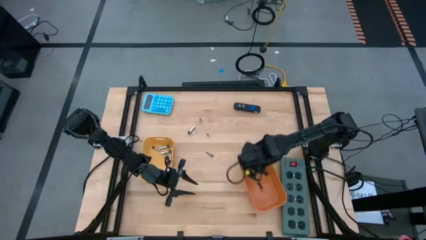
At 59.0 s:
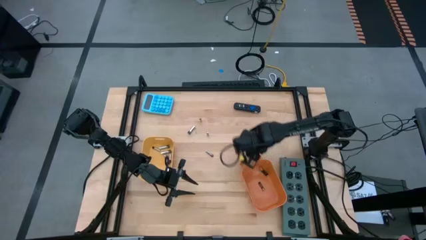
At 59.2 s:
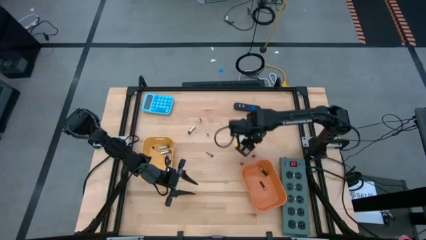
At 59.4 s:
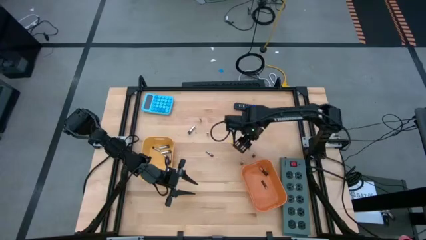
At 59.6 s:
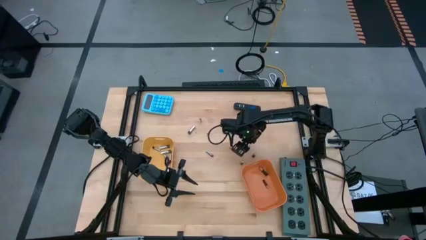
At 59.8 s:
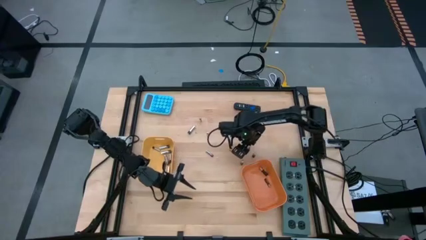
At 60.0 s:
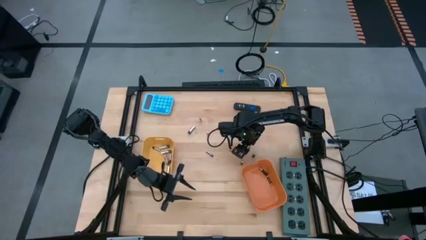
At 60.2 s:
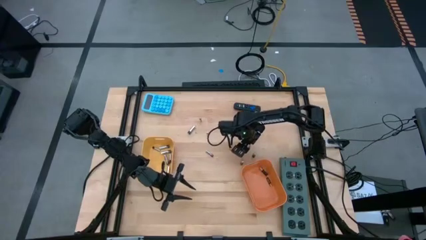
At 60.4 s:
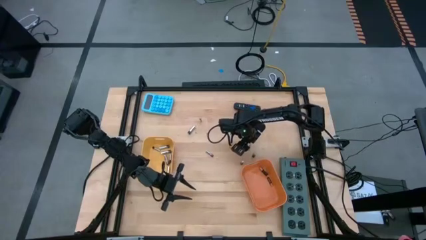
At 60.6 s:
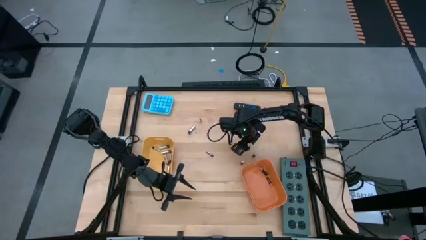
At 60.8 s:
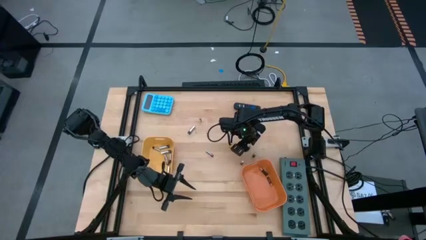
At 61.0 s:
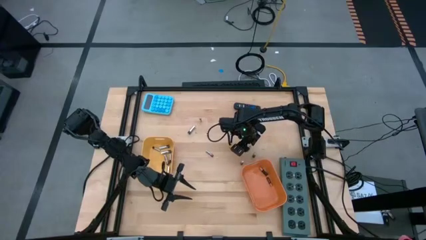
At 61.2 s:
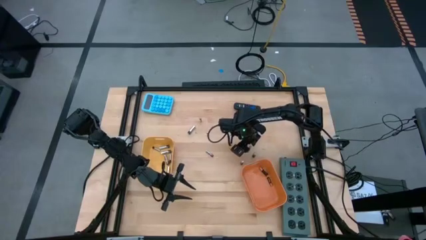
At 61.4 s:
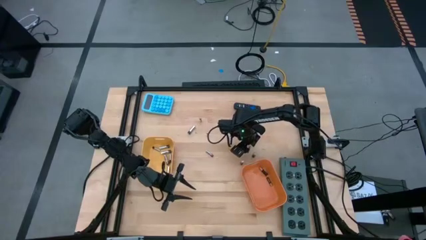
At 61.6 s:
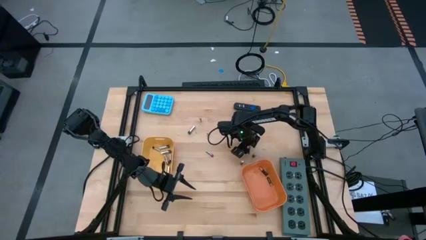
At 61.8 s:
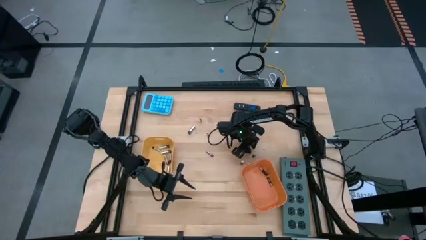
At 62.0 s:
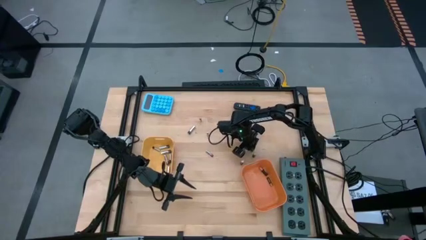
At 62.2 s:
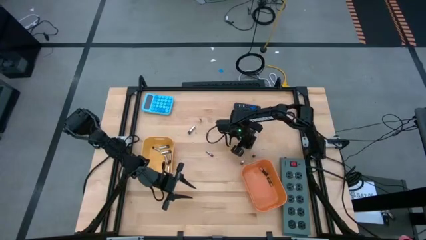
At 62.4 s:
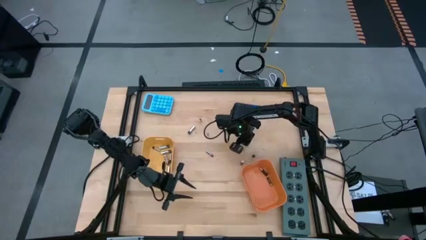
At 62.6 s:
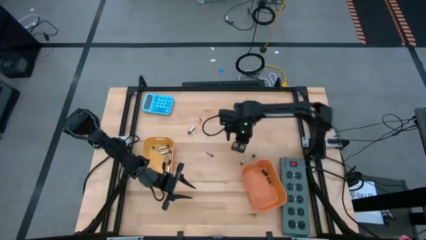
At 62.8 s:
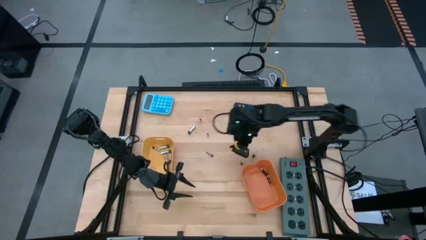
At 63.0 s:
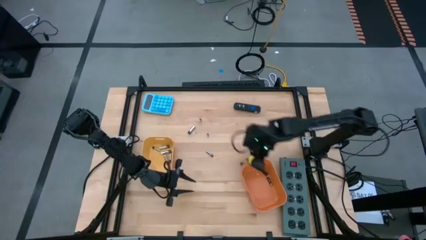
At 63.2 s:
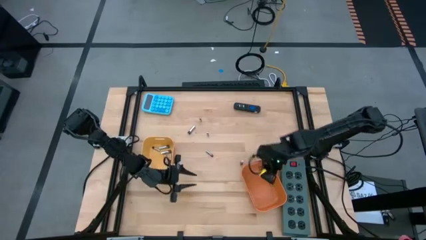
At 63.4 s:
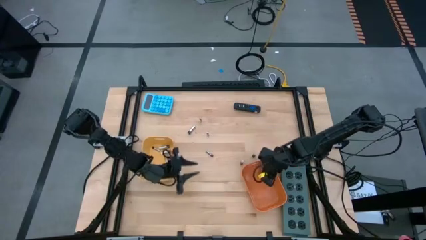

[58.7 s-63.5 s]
Task: Sort batteries
Put the black battery into the orange bin

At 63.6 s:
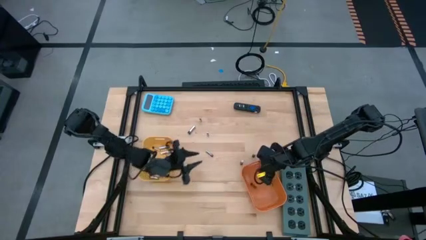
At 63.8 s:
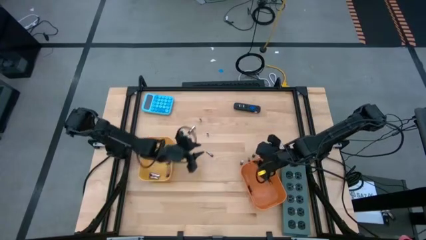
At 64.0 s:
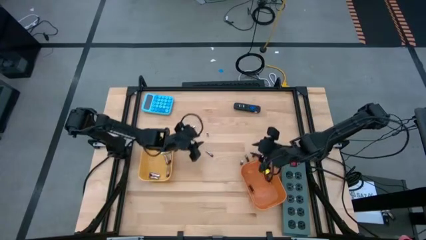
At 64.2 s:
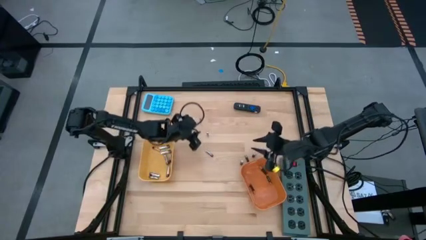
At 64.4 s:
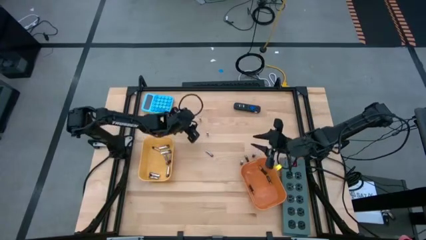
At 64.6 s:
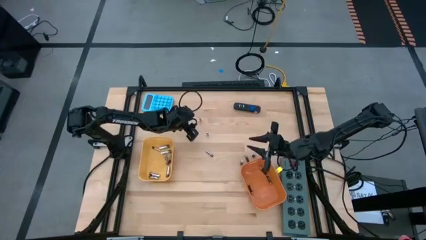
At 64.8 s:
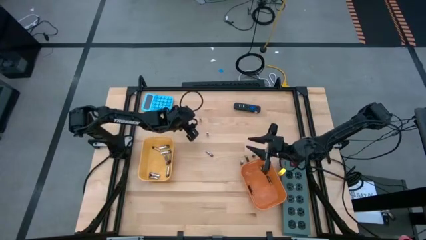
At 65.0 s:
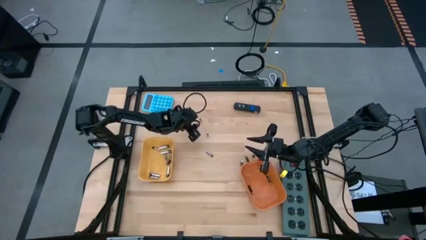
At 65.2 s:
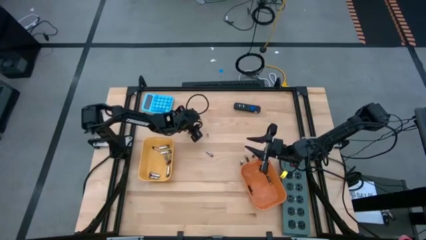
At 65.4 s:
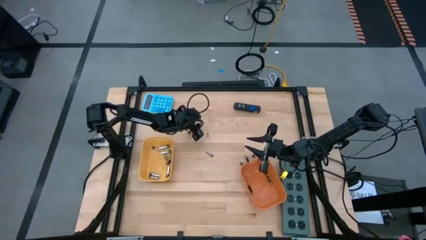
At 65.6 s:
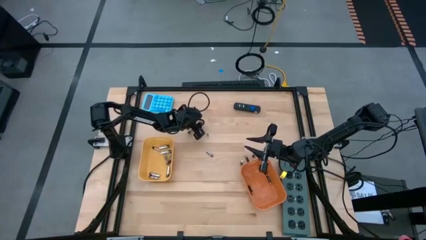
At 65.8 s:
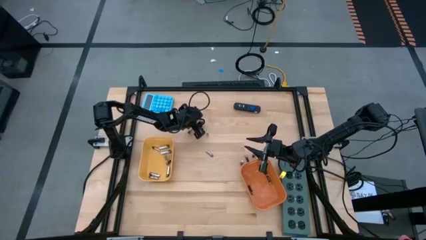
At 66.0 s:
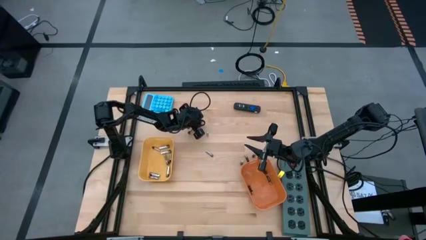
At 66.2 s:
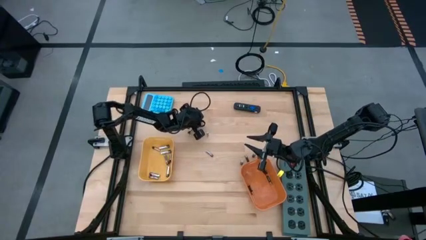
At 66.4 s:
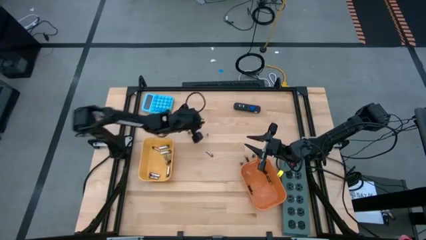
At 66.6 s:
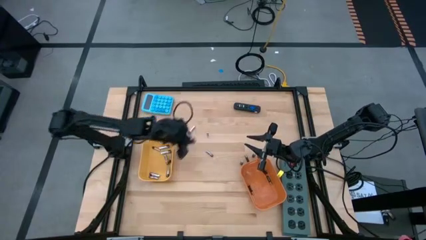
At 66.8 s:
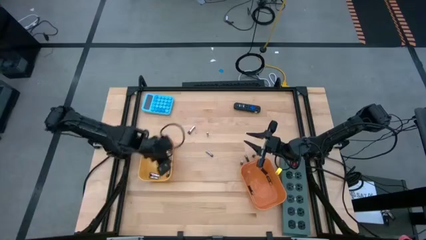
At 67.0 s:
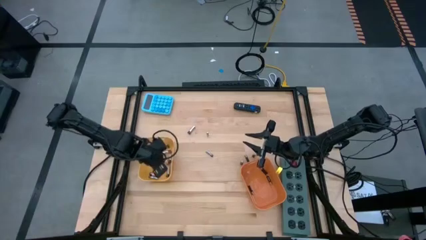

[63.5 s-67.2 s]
Put the silver battery into the yellow bin

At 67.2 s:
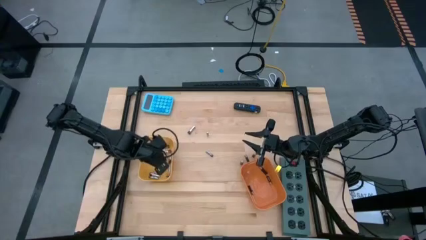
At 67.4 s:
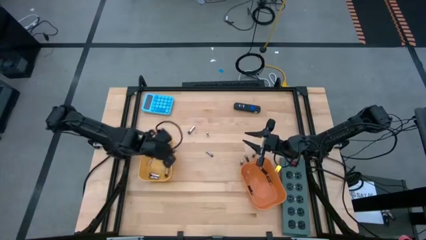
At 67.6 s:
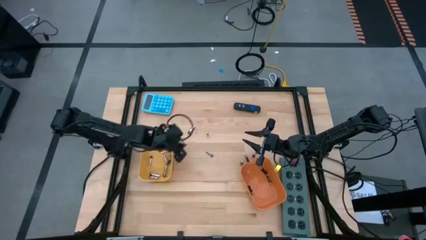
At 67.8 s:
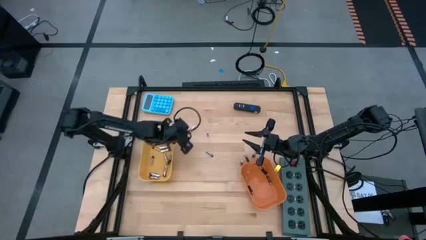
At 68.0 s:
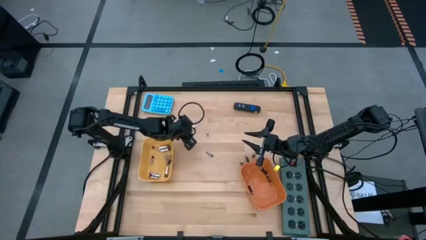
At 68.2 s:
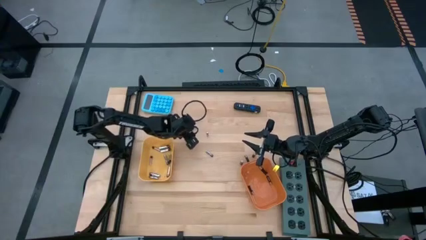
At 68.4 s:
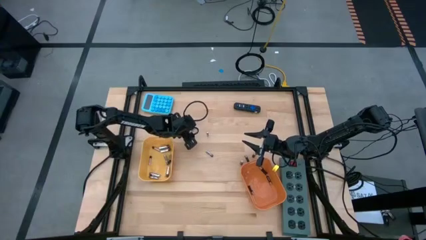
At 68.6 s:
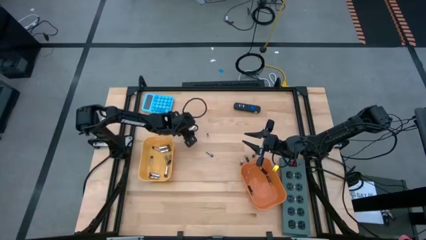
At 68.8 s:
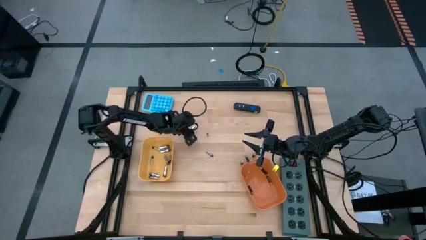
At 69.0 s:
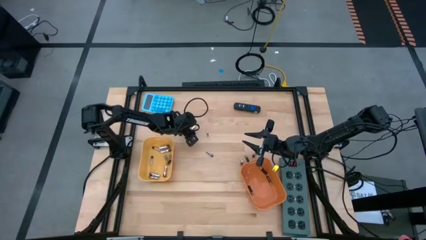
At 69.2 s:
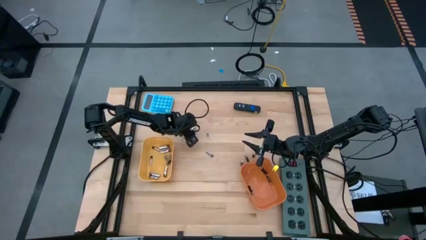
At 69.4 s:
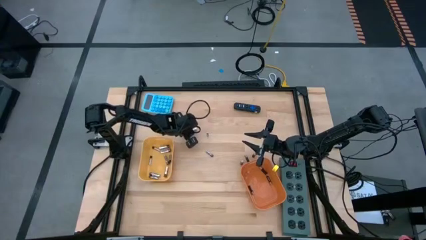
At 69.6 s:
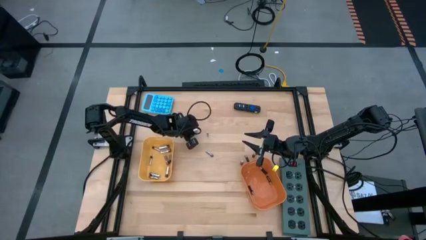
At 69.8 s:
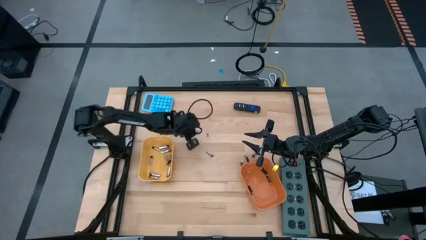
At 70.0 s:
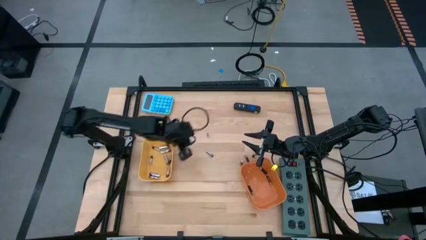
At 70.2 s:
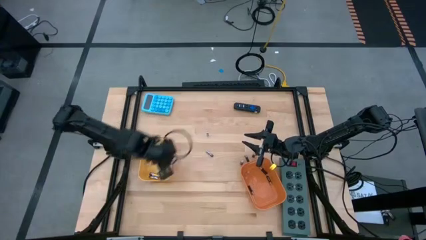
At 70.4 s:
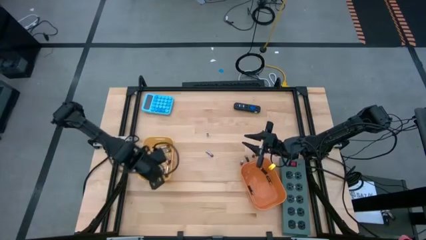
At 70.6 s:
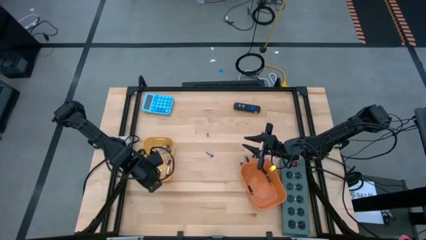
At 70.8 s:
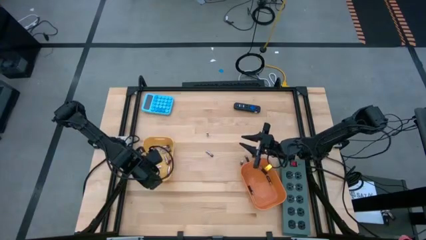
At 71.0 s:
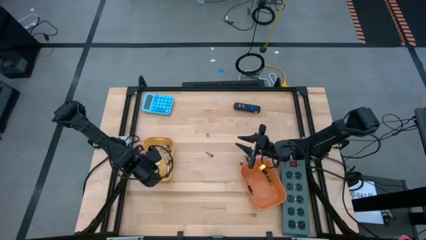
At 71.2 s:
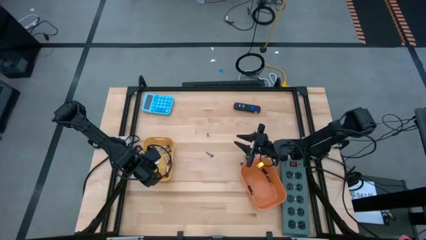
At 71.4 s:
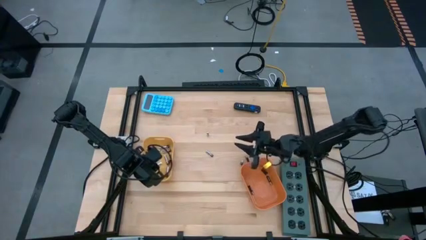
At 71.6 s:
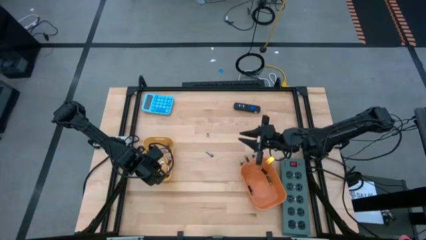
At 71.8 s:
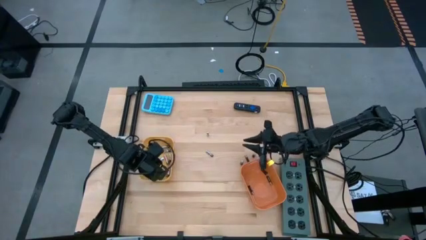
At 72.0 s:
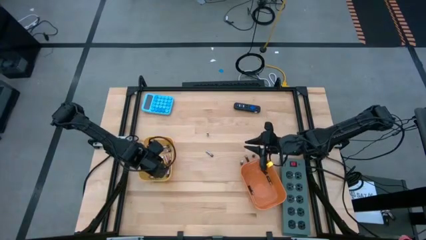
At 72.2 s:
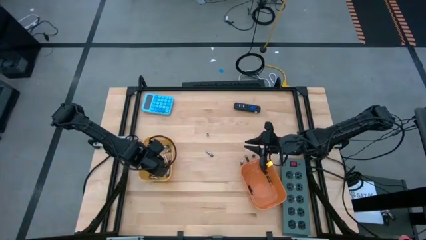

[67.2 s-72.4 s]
Put the silver battery into the yellow bin

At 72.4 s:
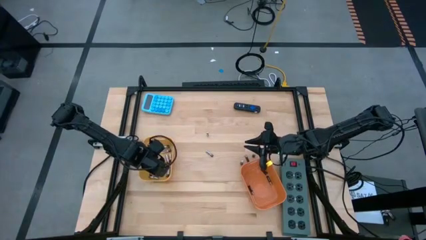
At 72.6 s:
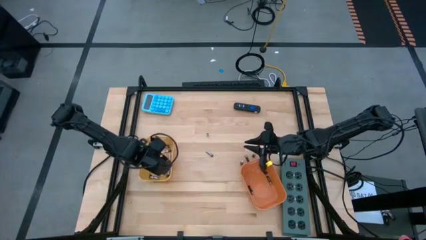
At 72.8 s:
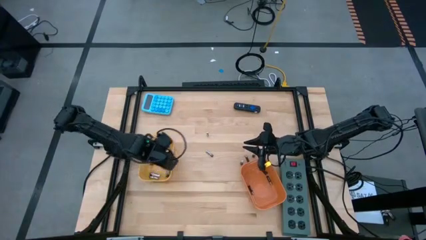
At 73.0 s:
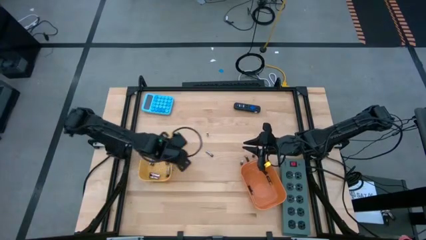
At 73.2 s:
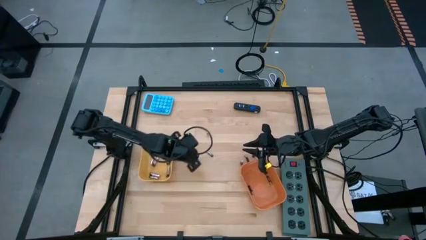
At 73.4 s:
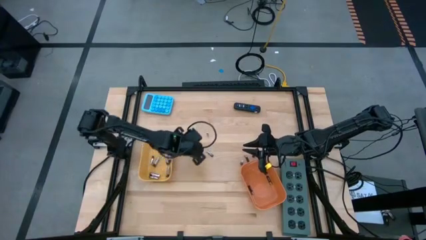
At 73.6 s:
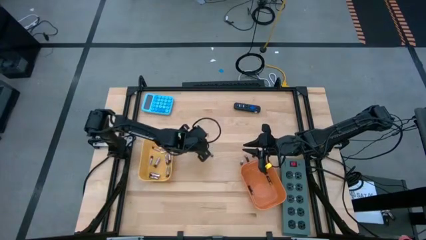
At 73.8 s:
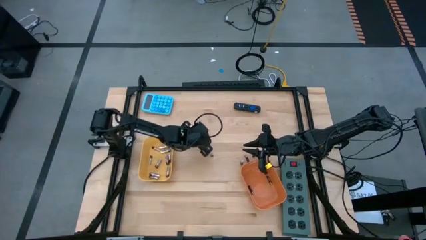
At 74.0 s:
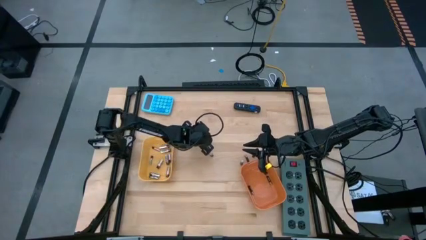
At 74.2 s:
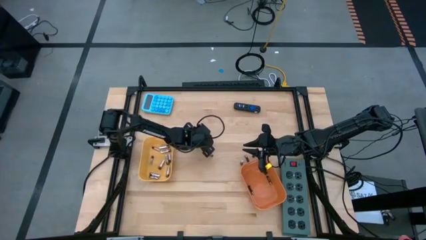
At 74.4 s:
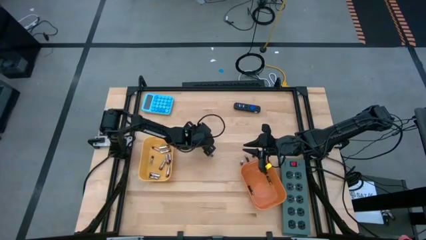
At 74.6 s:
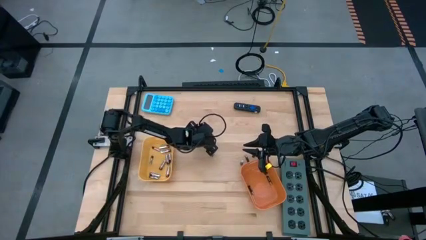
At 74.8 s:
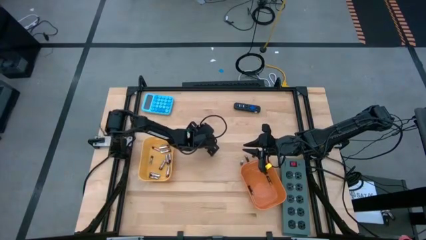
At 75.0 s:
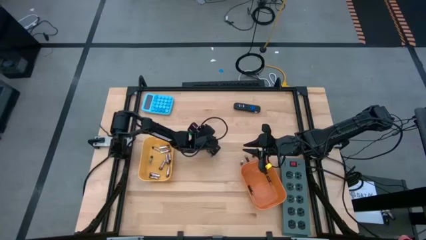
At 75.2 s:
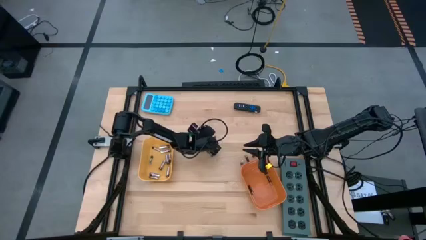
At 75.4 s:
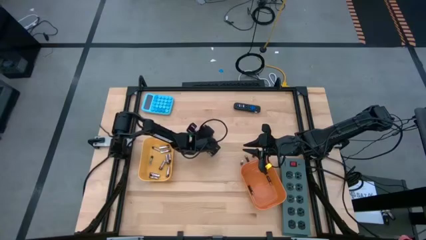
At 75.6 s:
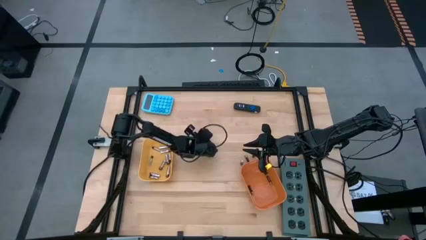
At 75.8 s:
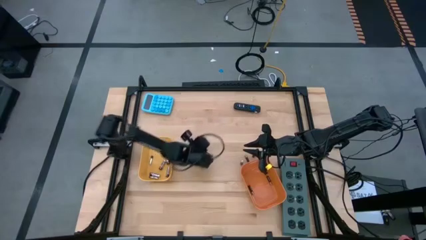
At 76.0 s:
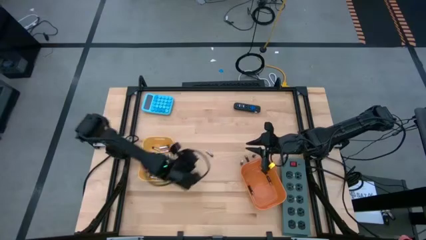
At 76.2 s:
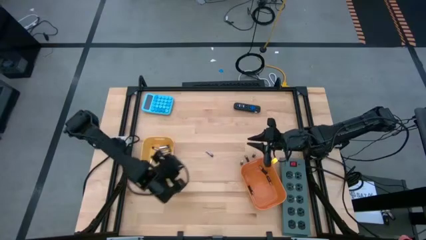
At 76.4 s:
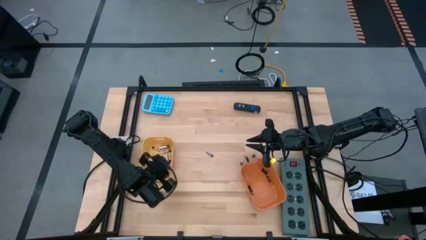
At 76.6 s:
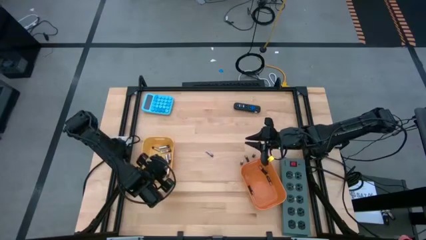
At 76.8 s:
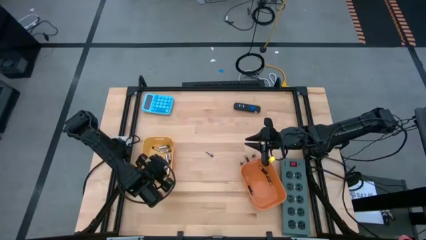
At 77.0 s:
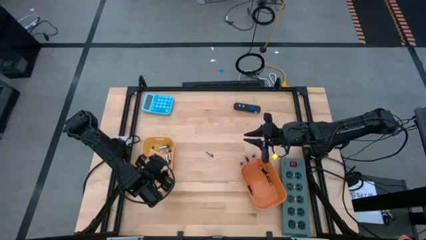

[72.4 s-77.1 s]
Put the silver battery into the yellow bin
